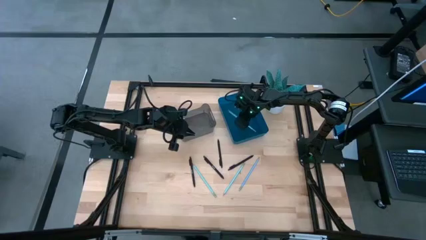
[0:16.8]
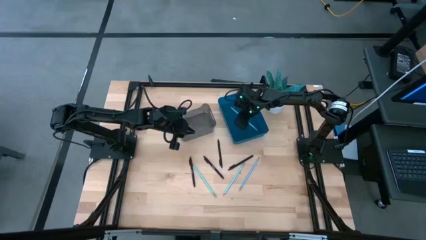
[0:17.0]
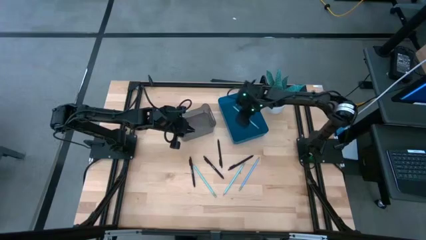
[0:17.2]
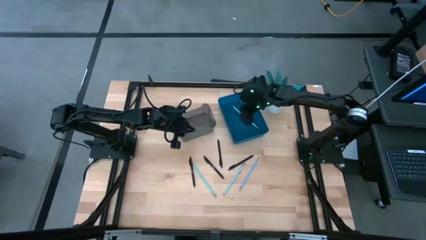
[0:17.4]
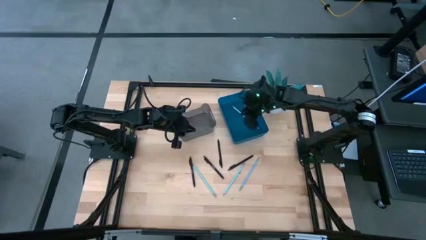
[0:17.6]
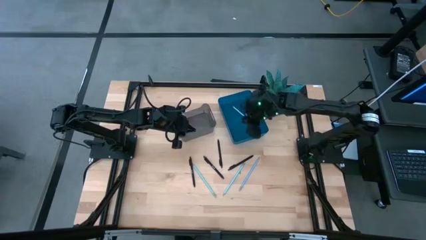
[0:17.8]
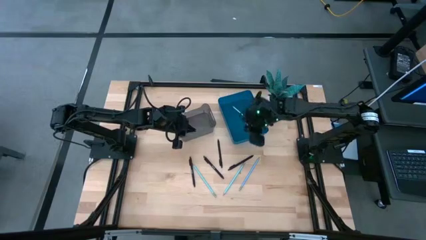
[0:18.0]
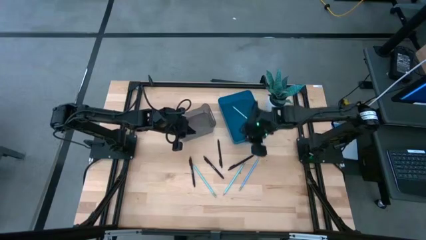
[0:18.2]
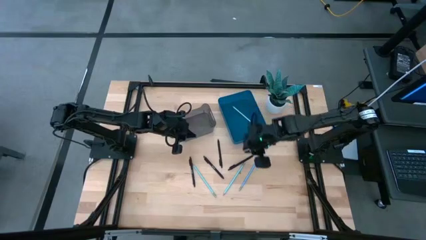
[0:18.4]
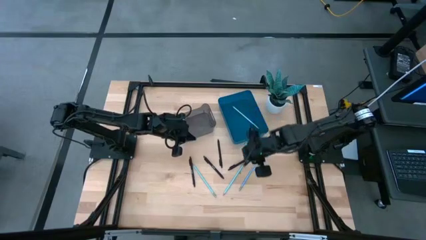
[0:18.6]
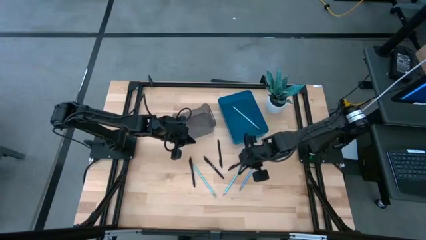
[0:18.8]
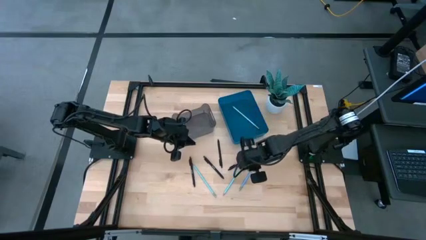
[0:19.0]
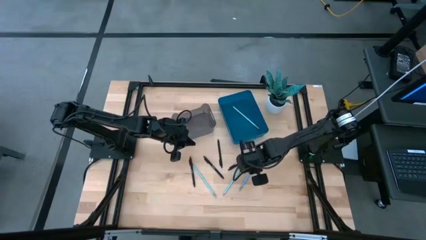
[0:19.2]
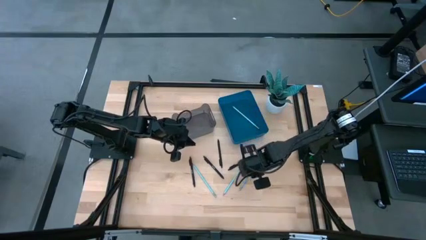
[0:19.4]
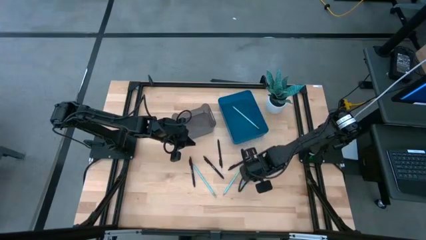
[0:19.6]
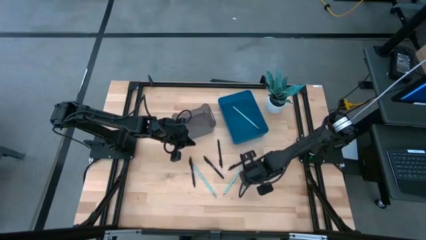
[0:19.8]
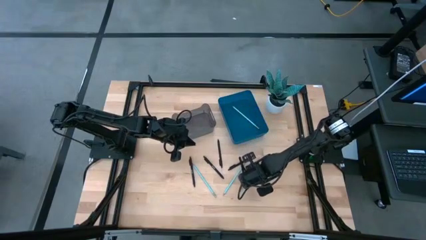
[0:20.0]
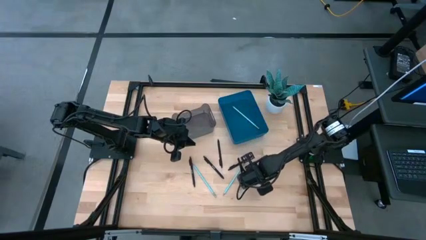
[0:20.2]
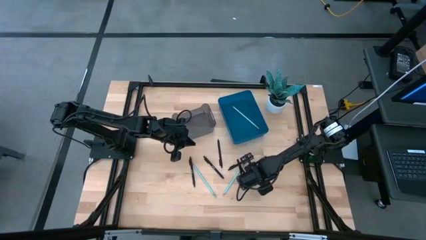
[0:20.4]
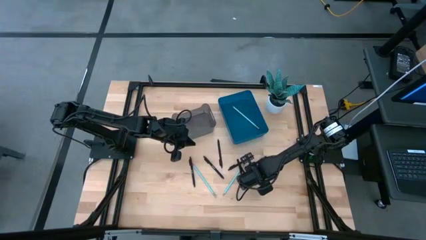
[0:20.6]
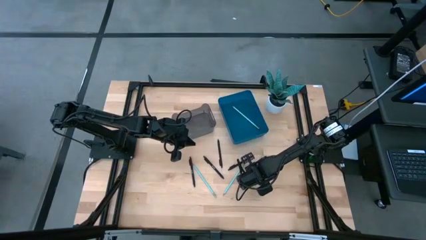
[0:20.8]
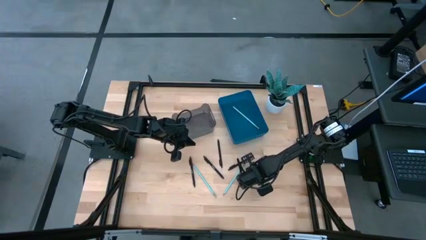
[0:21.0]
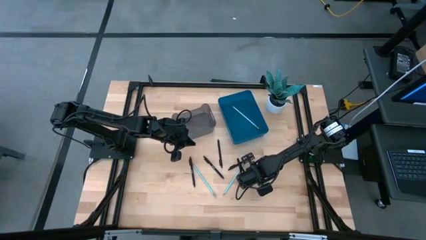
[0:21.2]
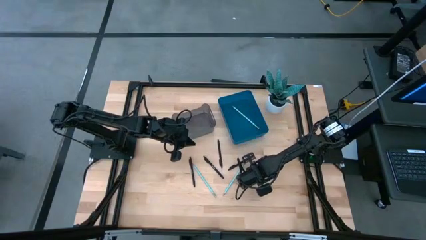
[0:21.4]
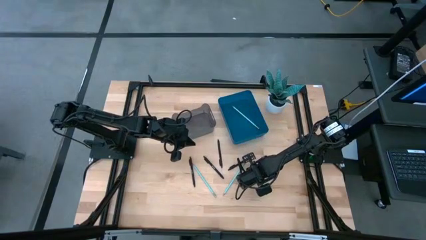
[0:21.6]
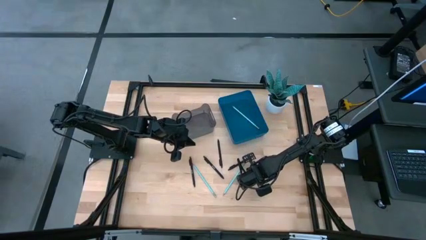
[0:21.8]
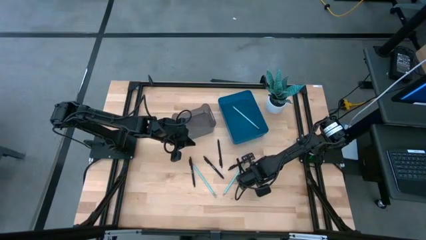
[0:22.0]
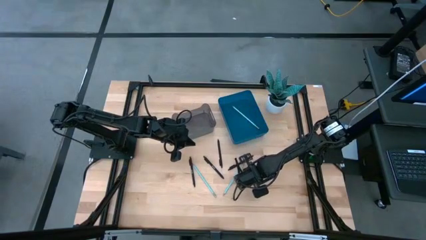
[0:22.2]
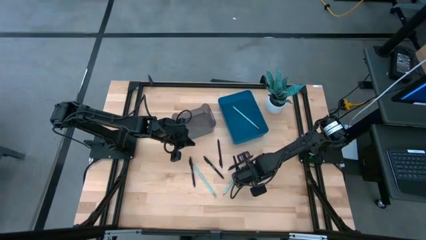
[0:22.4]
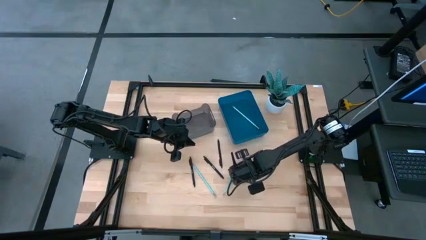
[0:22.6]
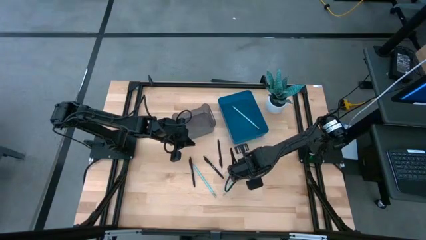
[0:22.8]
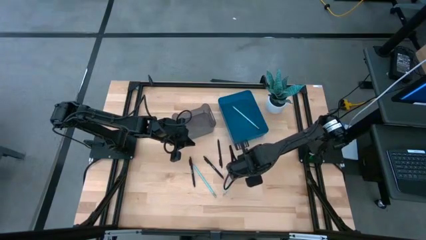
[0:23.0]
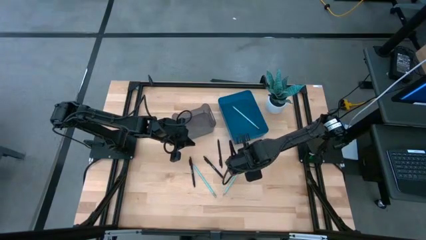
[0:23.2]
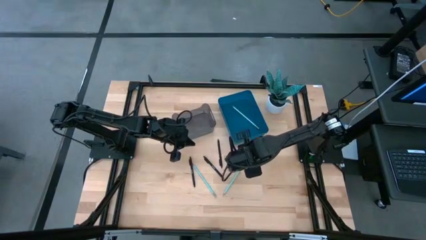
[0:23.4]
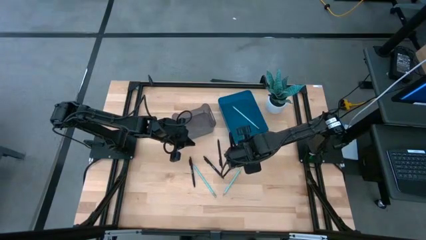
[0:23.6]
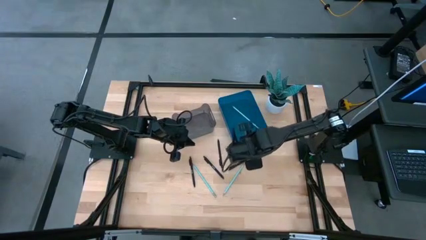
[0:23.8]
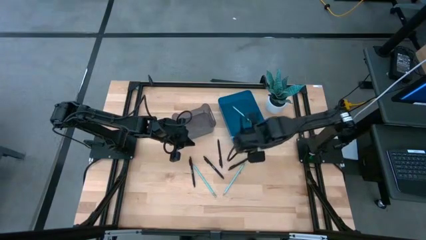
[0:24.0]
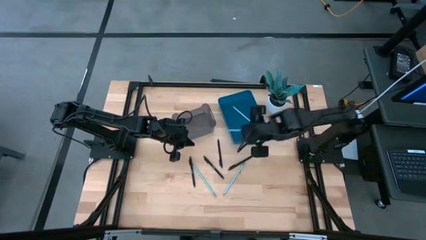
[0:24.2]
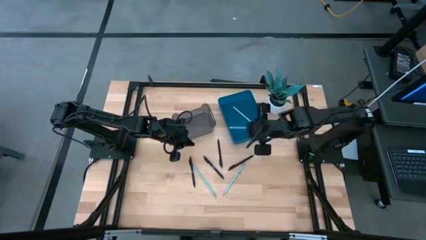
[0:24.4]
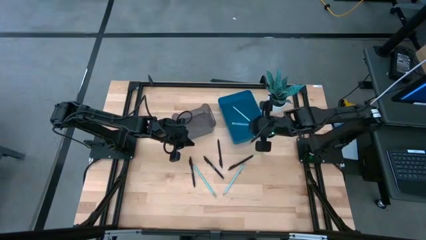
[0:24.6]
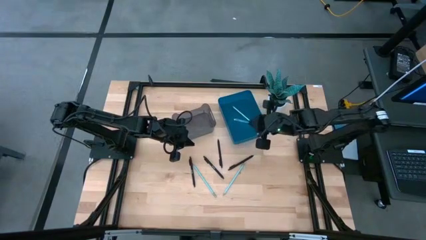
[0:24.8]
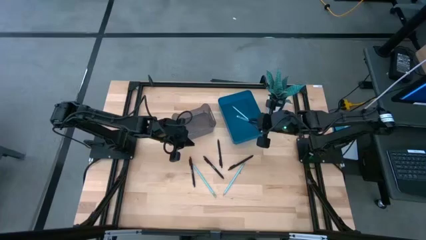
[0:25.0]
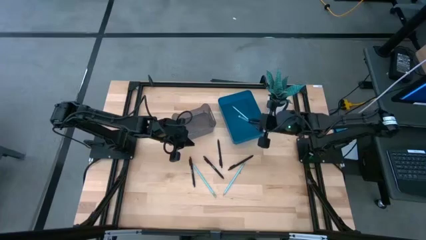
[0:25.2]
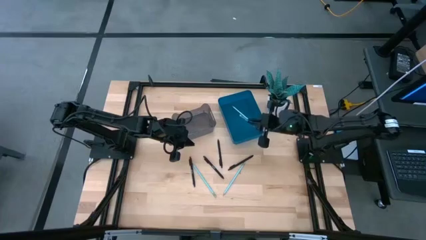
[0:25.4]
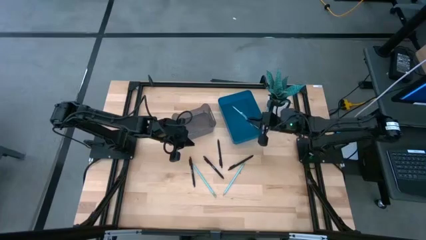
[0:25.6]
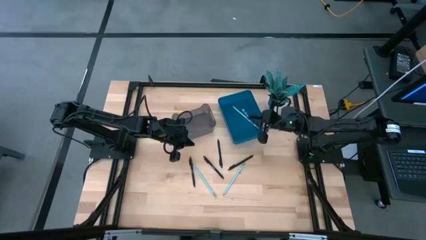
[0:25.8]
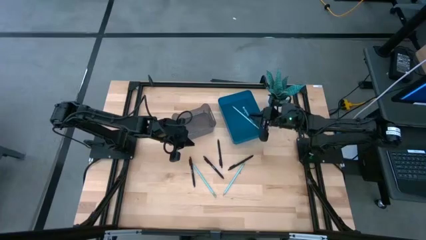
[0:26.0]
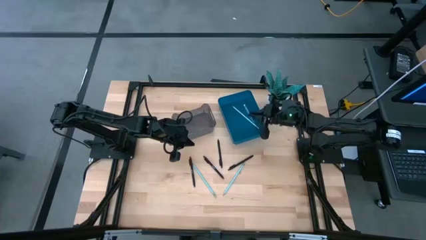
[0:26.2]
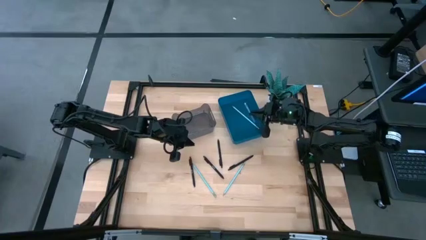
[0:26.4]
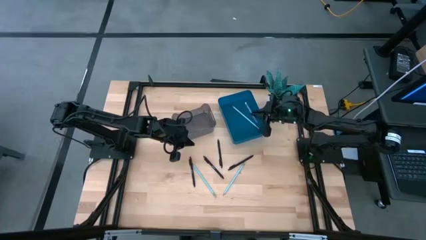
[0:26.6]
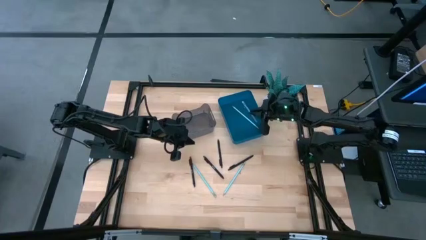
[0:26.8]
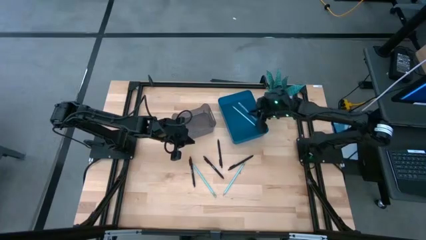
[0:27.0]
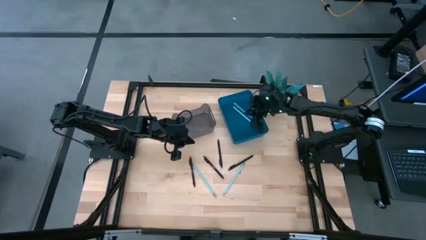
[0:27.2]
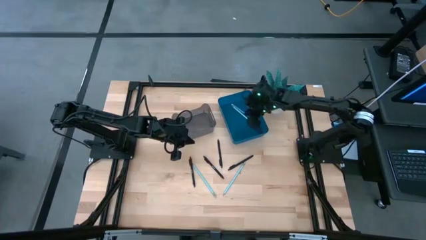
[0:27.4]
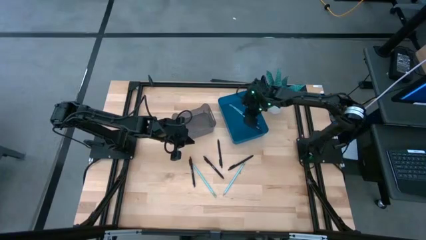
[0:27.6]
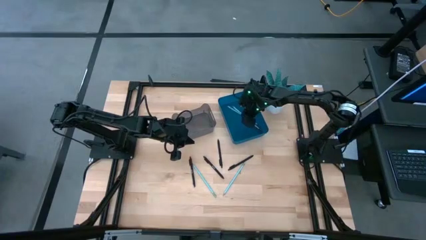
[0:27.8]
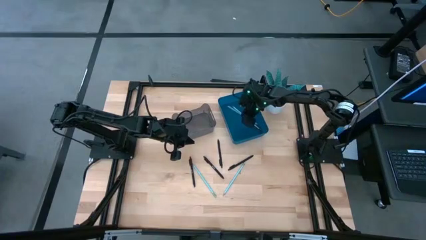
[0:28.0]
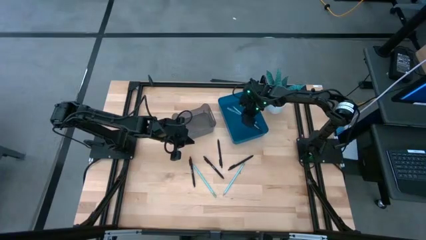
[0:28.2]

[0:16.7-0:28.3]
Task: Sort pens & pencils
Put the blue pencil into the blue bin

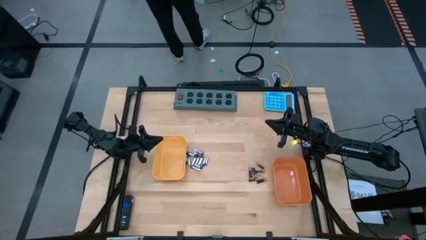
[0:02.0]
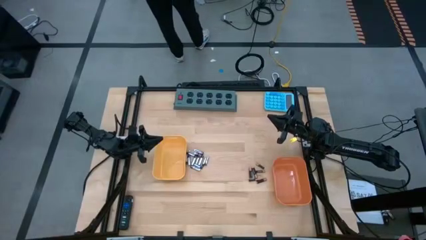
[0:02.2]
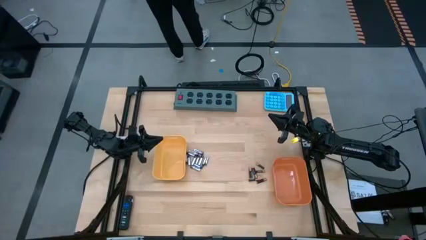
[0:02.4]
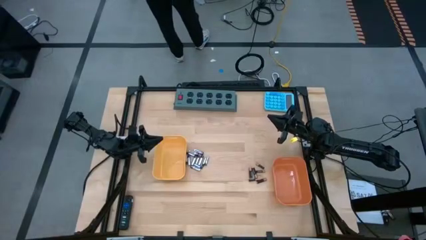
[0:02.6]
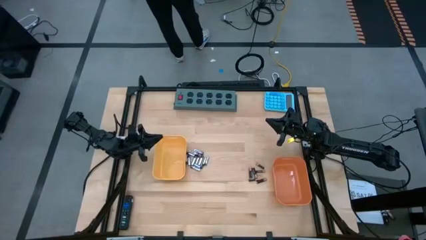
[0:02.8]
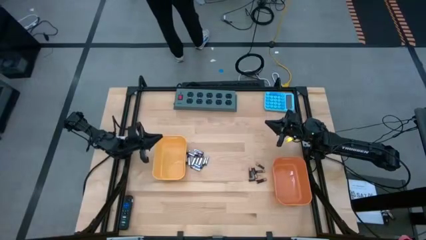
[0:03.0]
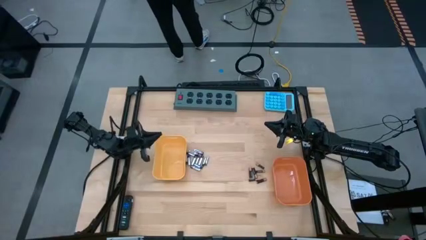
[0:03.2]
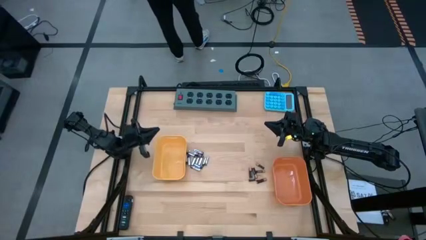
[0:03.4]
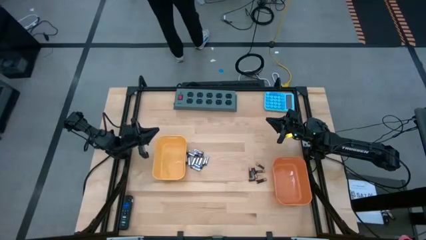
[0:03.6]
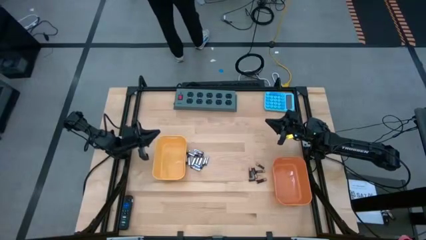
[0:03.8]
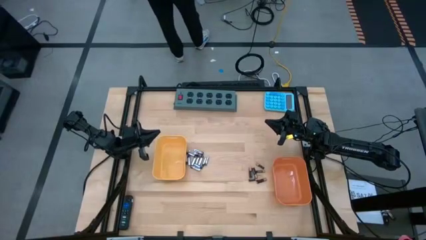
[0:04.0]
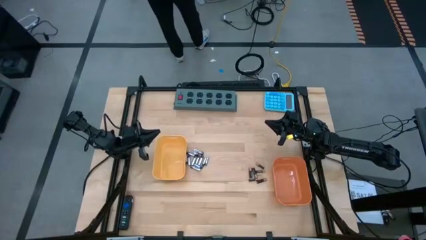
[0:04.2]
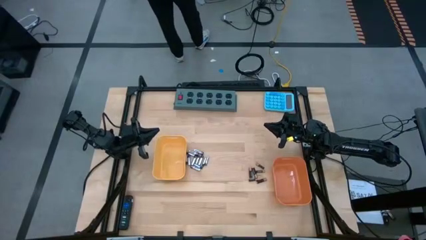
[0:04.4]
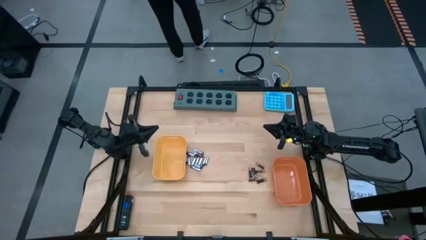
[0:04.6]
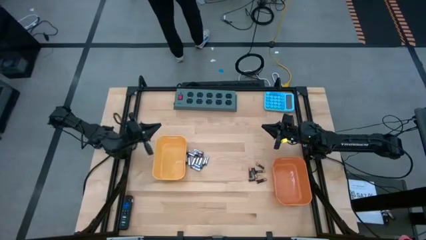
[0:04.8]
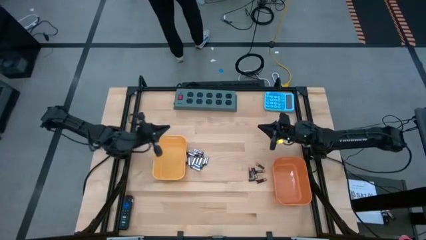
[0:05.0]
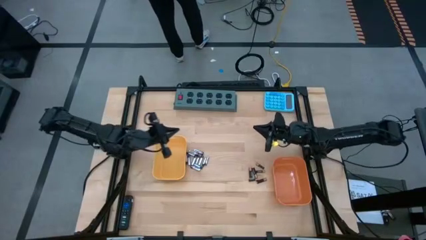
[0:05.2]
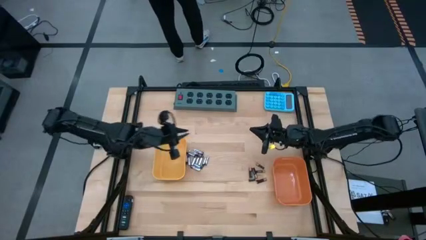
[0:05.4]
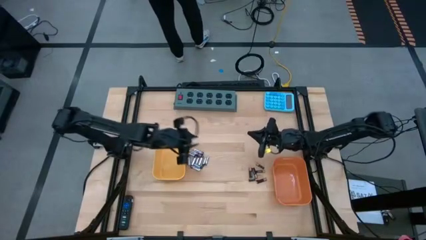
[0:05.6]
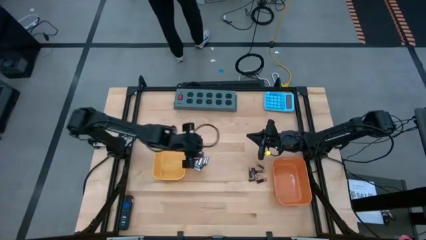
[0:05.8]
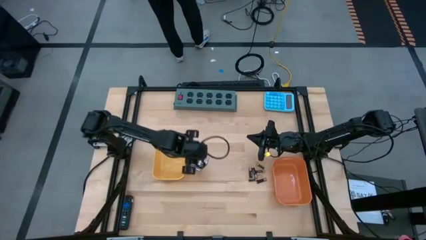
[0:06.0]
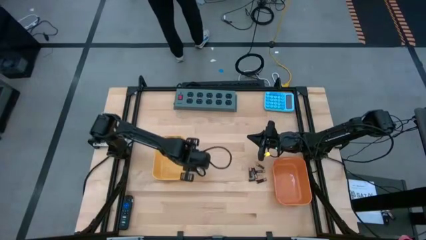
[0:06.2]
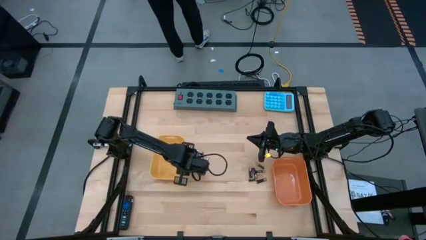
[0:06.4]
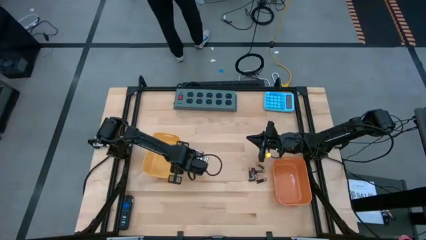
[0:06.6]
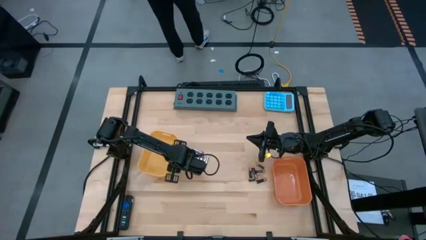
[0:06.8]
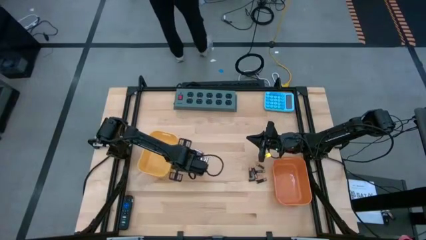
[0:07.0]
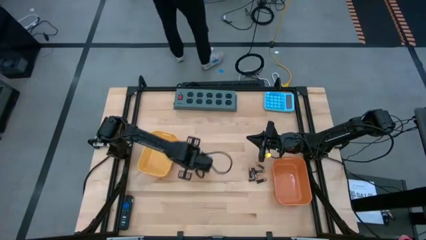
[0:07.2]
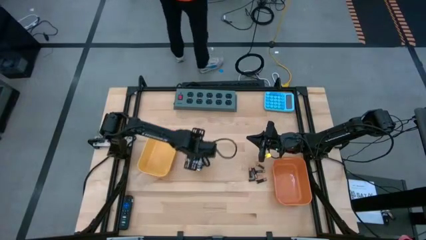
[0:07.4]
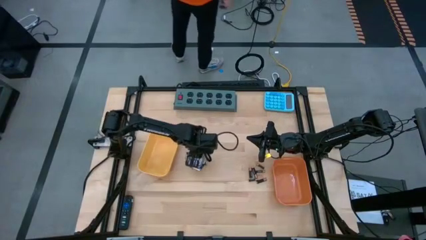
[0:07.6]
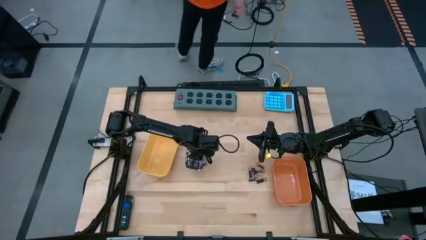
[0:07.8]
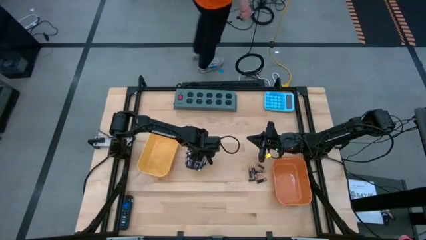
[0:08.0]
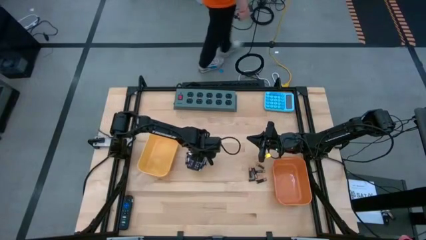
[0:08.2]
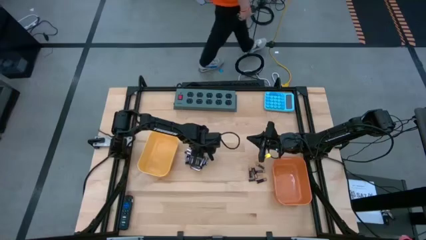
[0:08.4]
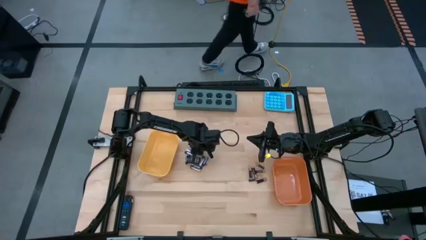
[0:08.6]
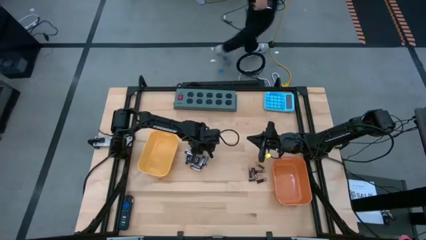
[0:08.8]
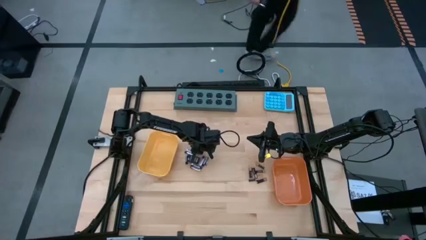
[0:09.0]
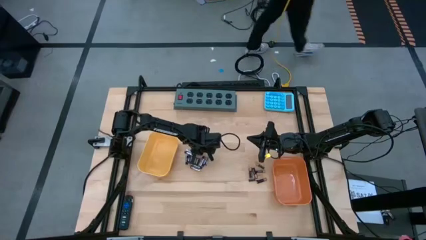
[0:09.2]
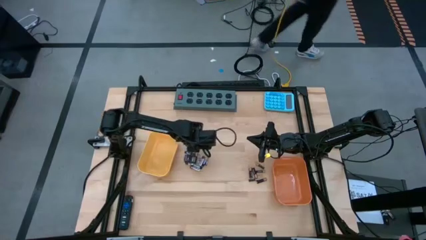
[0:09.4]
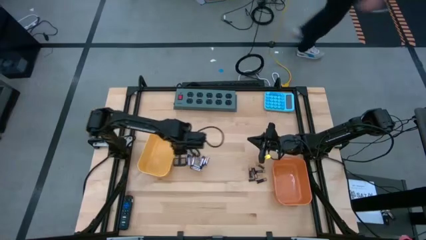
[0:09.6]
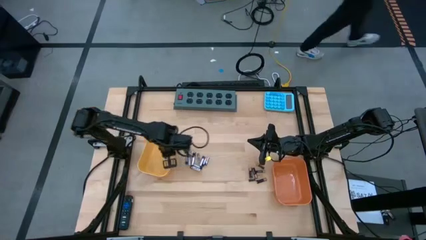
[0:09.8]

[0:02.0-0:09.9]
Task: Sort batteries
Put the silver battery into the yellow bin
